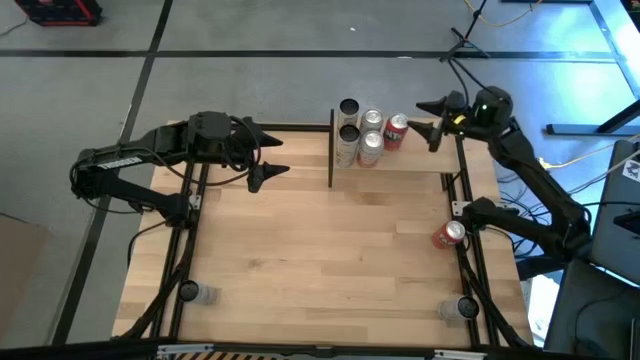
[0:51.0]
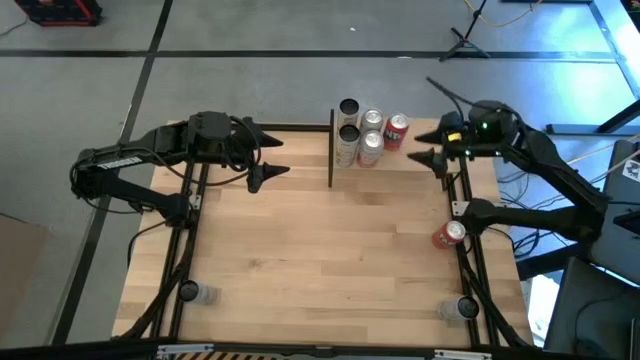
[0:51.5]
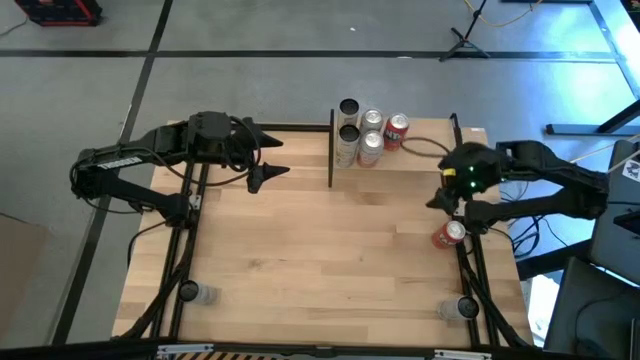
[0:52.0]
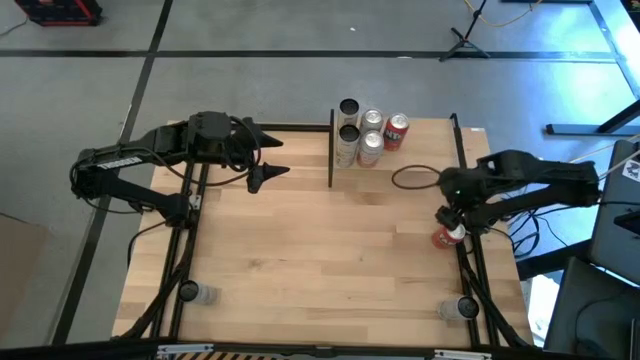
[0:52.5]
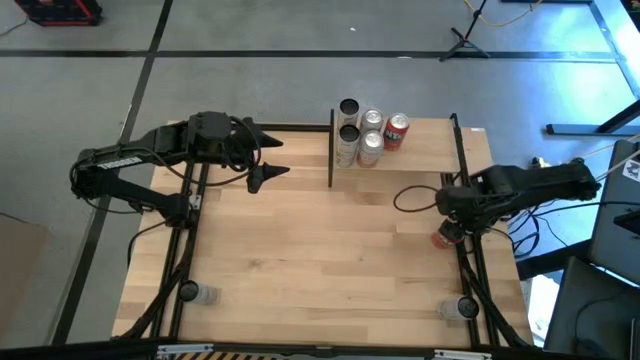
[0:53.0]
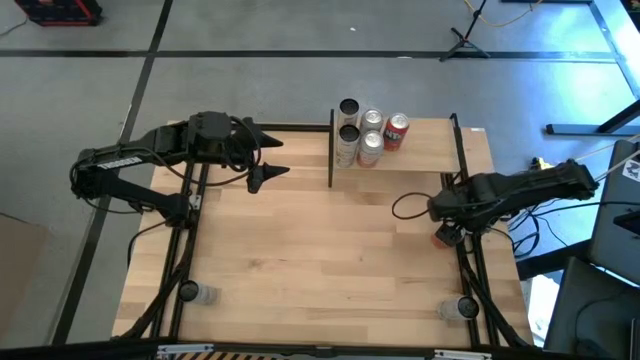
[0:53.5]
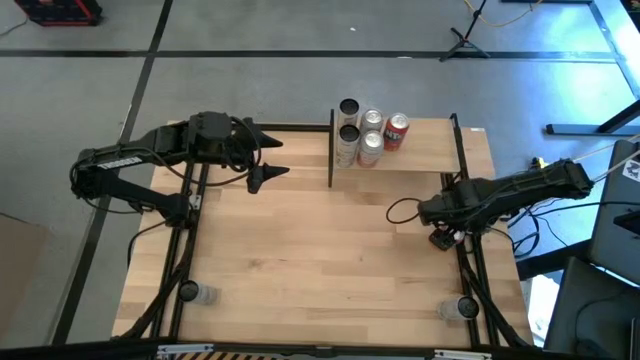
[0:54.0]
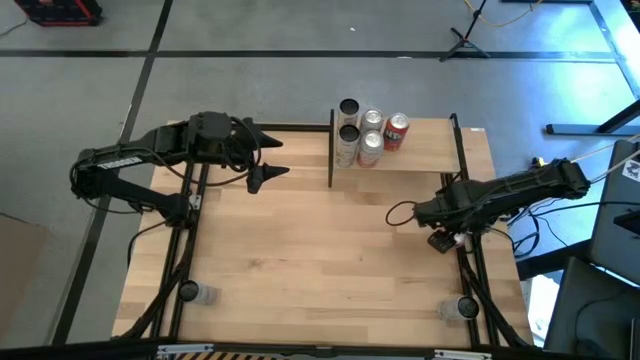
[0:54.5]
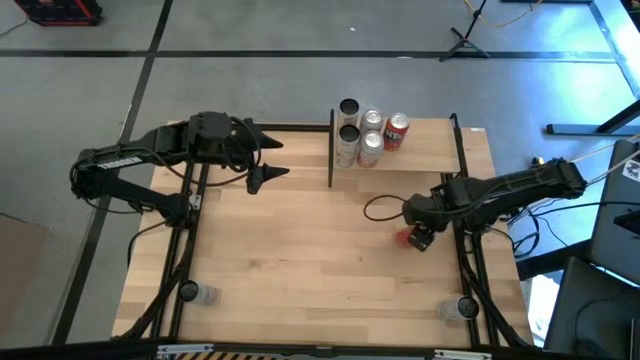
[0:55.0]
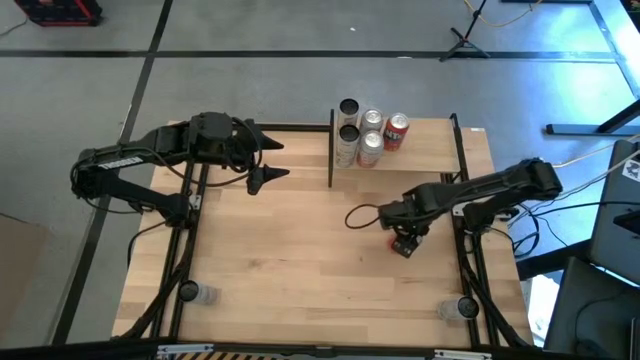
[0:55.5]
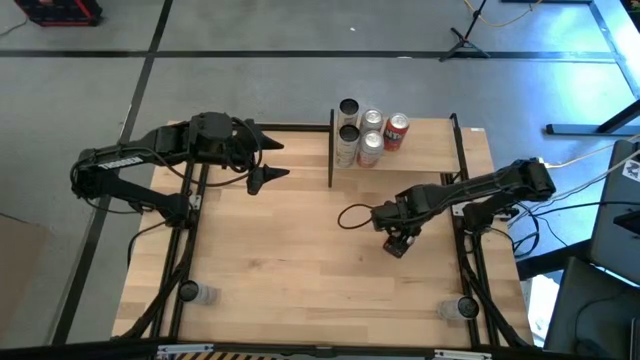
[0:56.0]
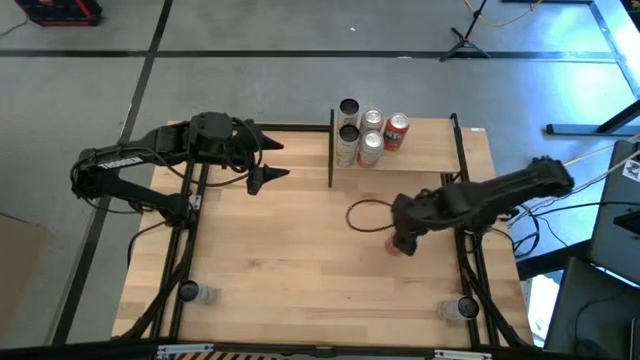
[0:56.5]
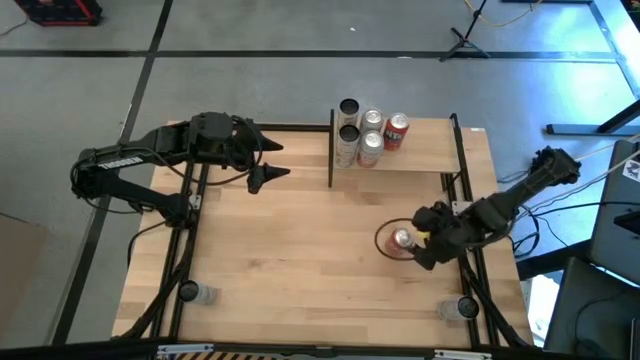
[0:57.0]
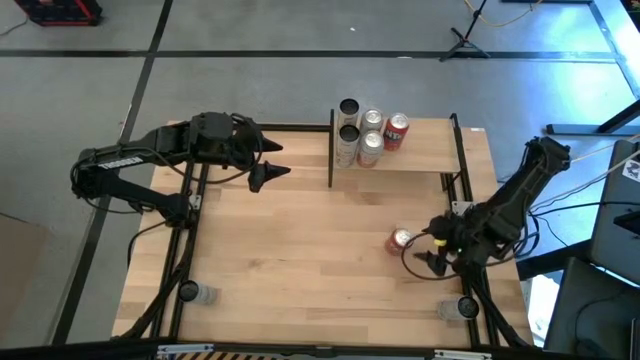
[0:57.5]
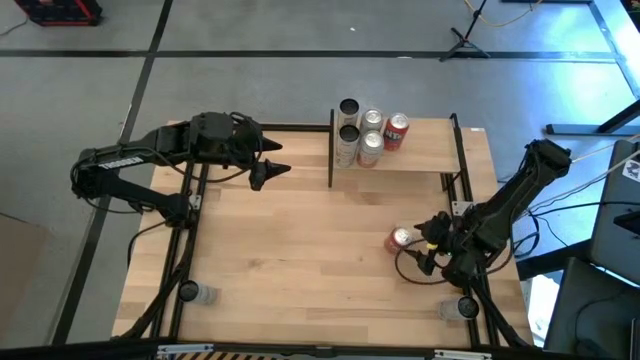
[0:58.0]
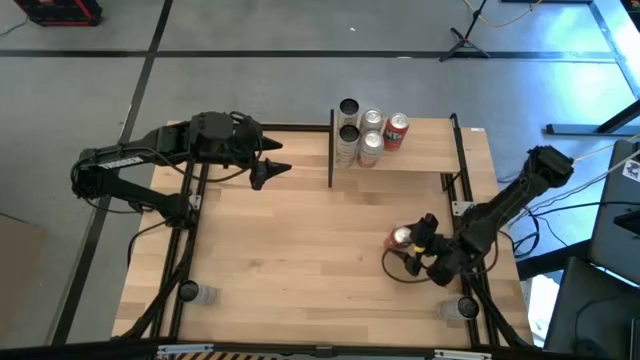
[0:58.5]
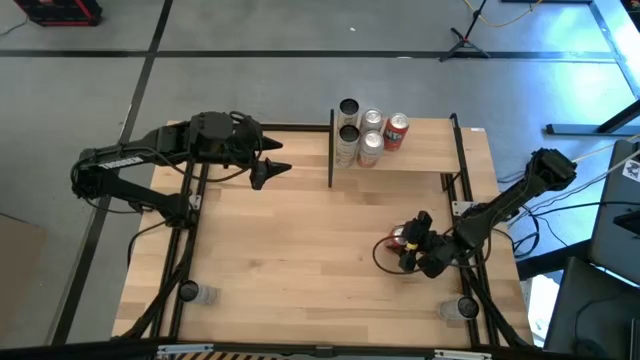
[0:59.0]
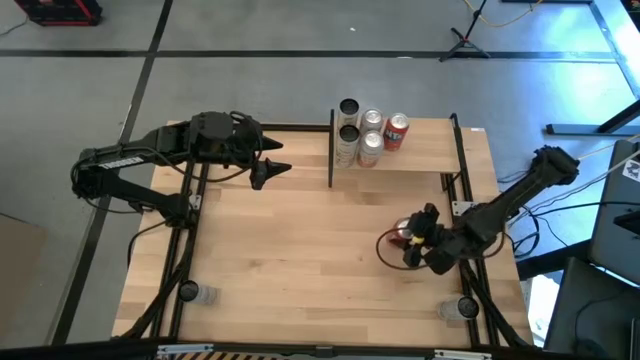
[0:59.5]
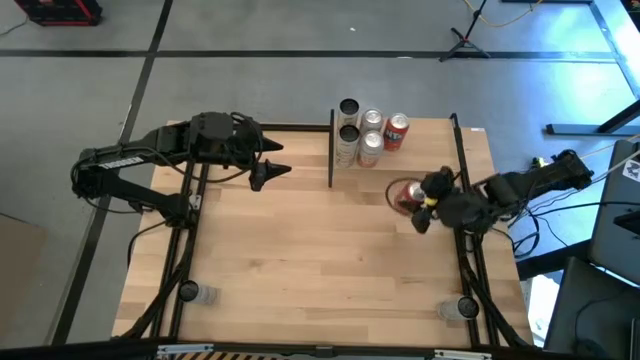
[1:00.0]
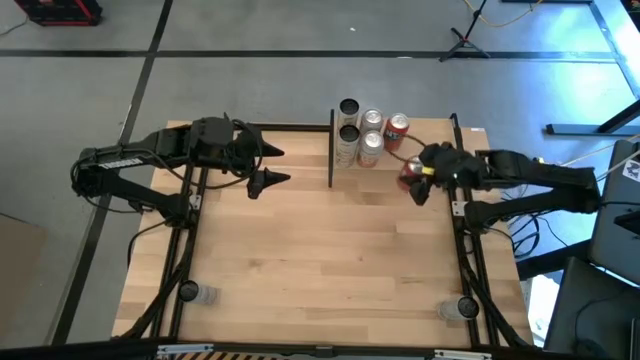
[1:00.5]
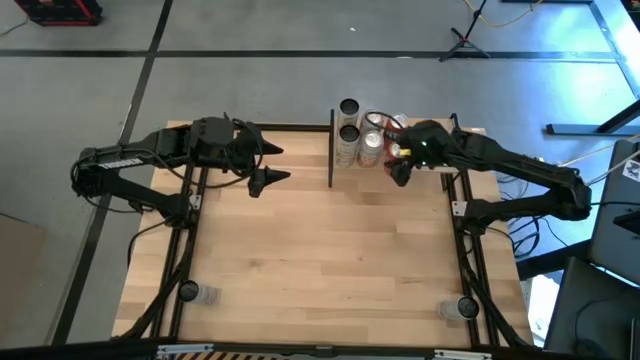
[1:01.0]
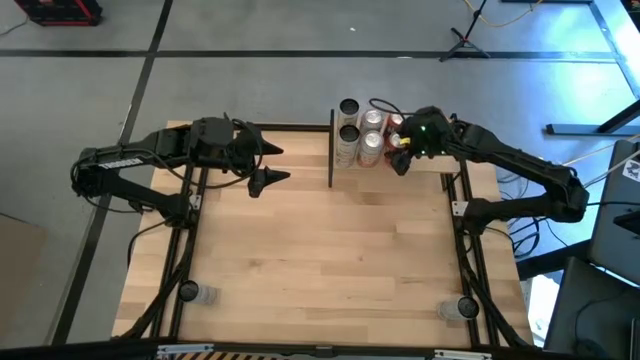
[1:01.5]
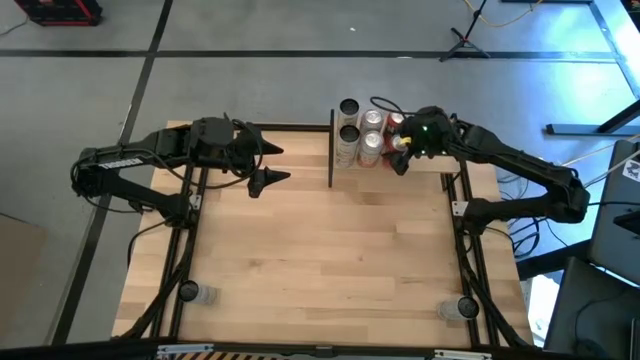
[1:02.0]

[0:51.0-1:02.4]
Task: Place canned beverage on shelf
Put the orange soda can onto the shelf

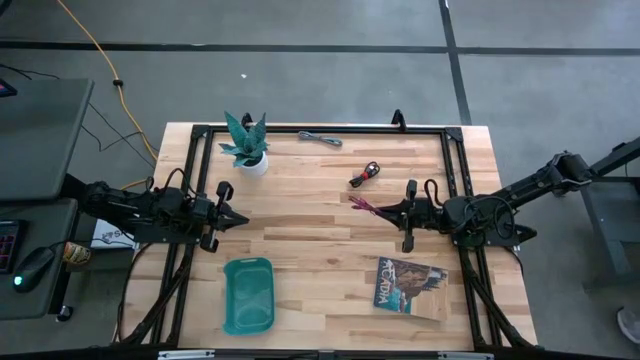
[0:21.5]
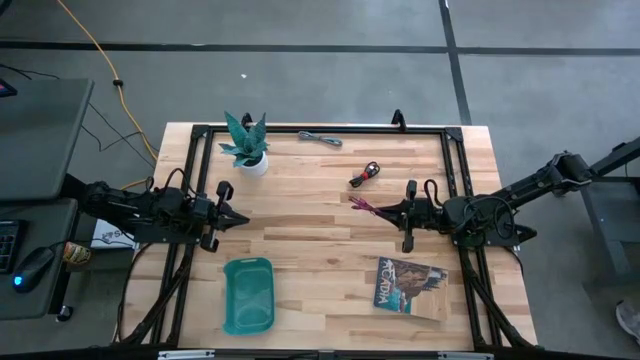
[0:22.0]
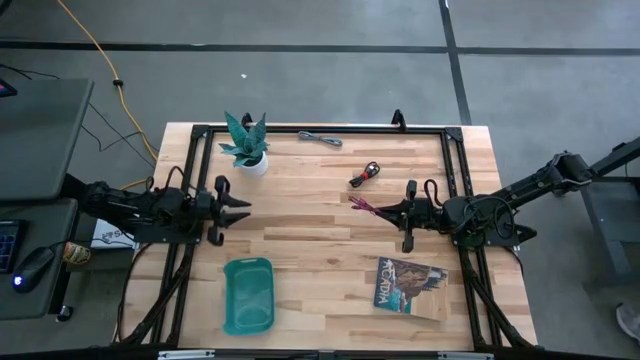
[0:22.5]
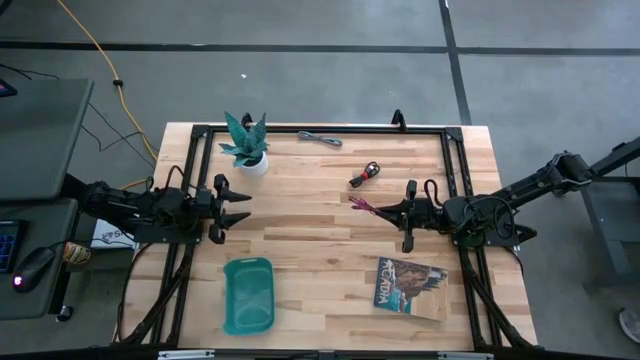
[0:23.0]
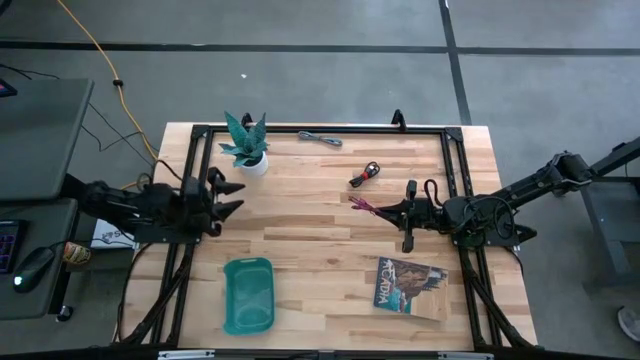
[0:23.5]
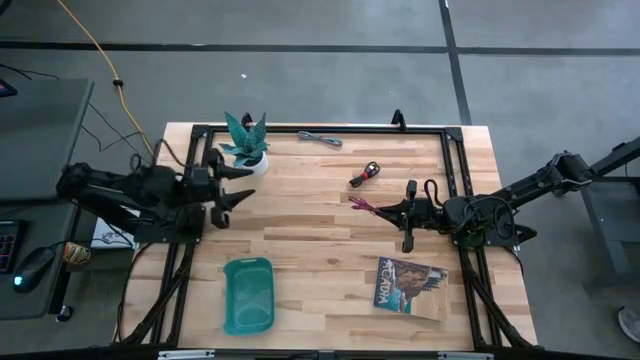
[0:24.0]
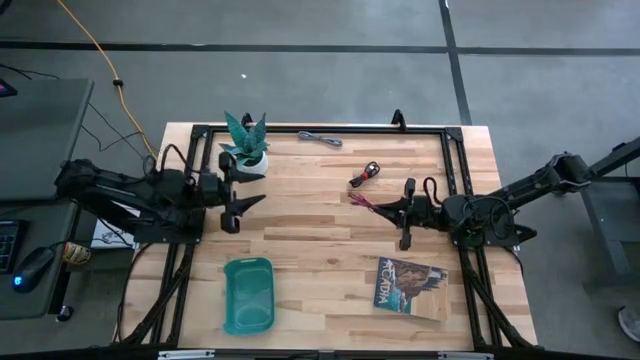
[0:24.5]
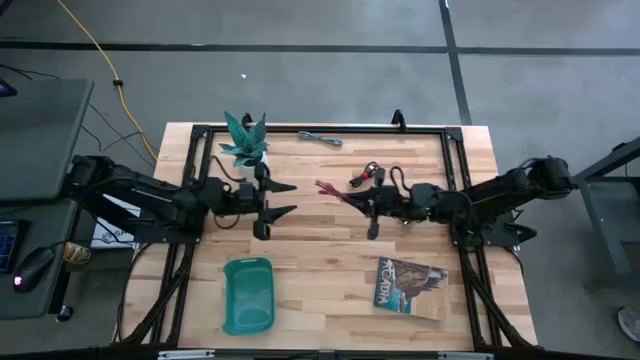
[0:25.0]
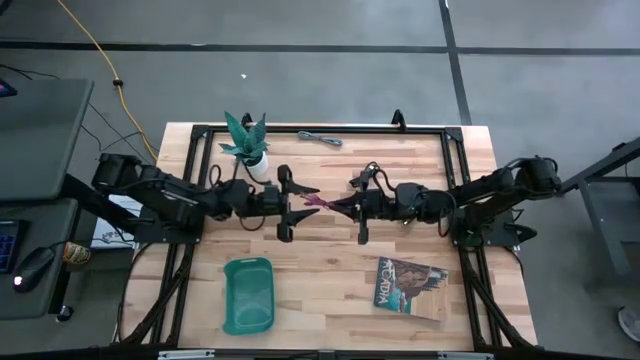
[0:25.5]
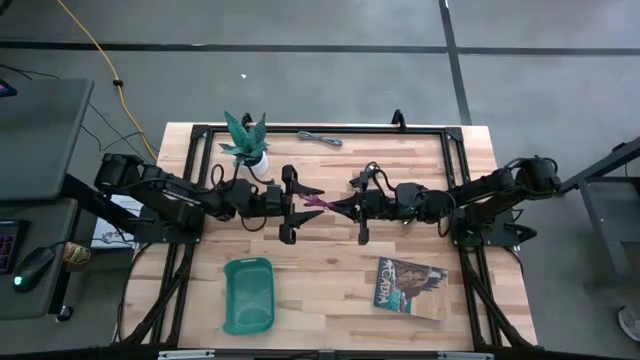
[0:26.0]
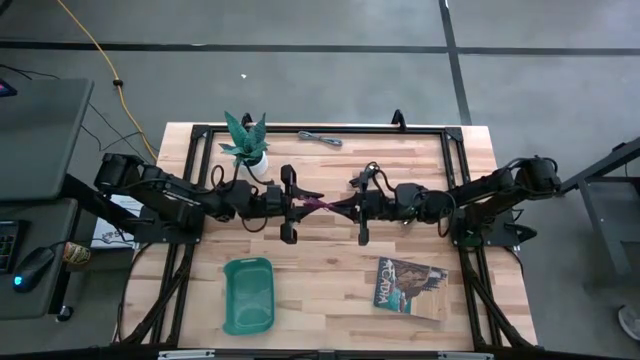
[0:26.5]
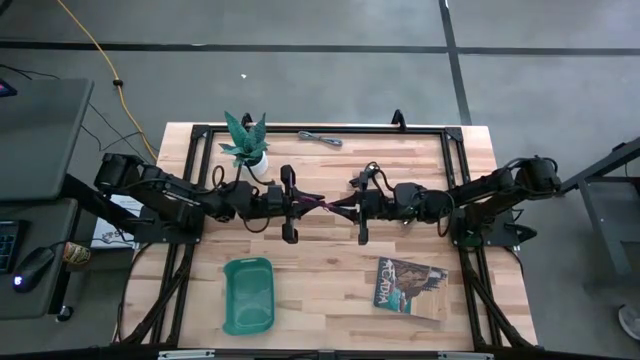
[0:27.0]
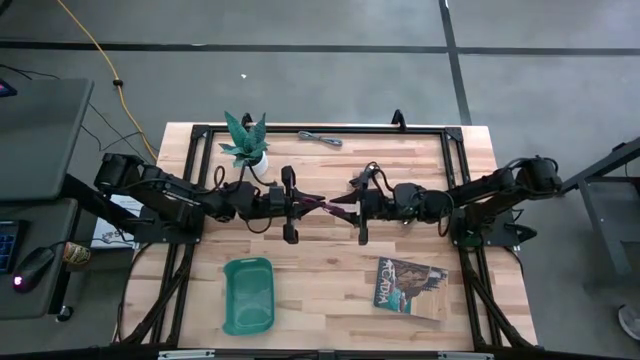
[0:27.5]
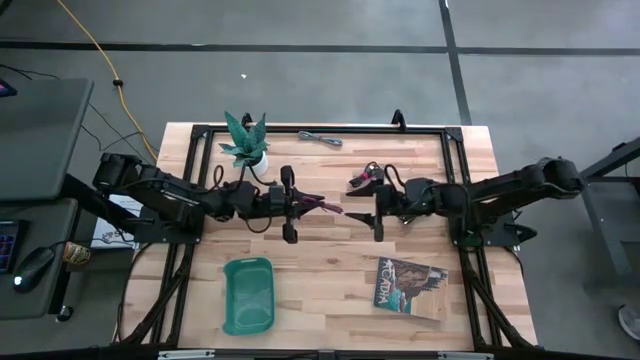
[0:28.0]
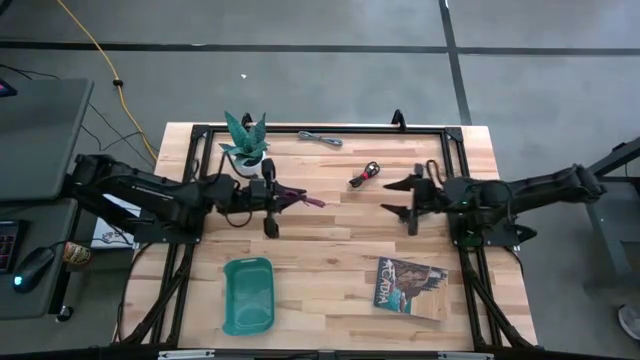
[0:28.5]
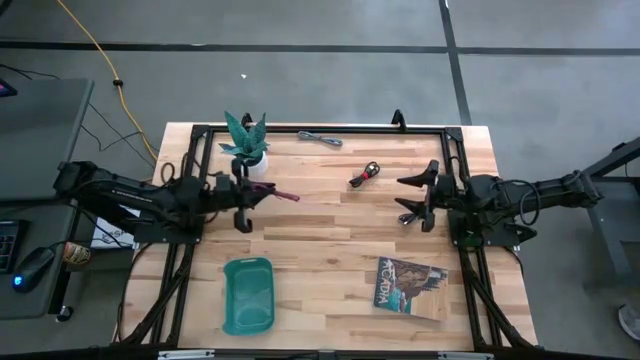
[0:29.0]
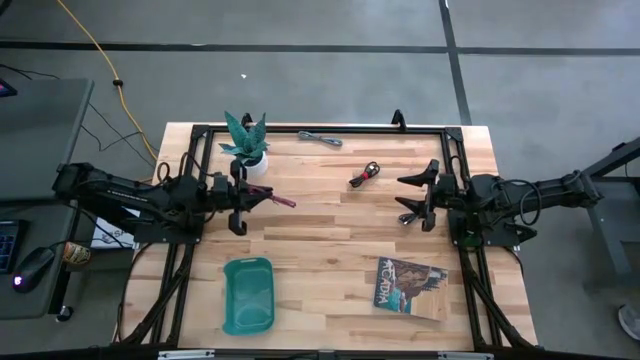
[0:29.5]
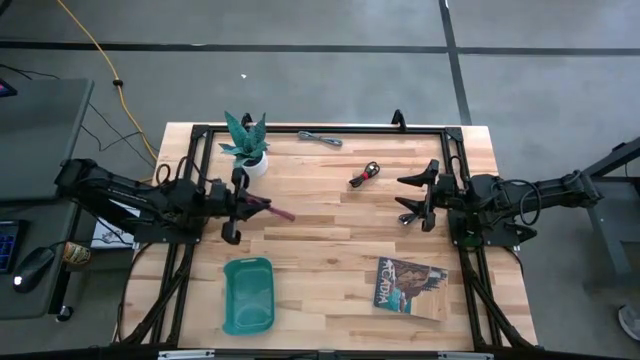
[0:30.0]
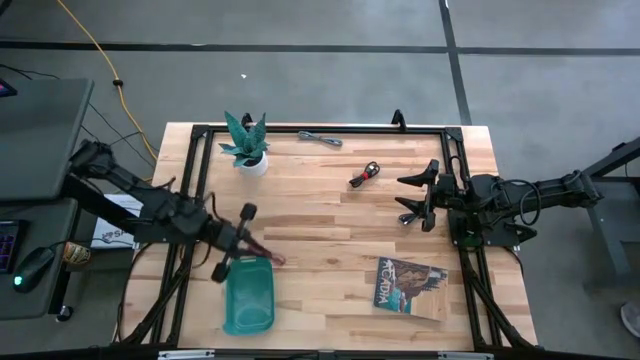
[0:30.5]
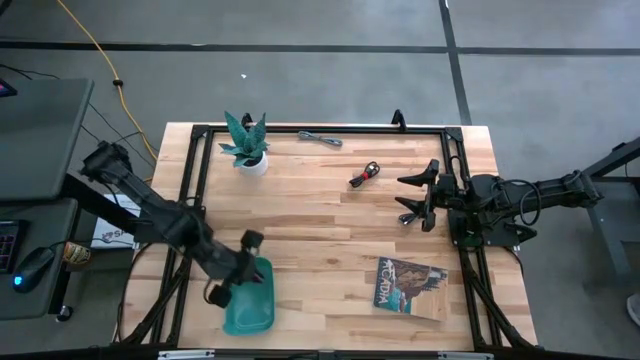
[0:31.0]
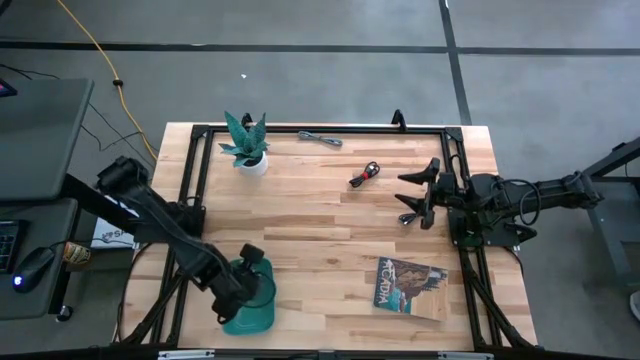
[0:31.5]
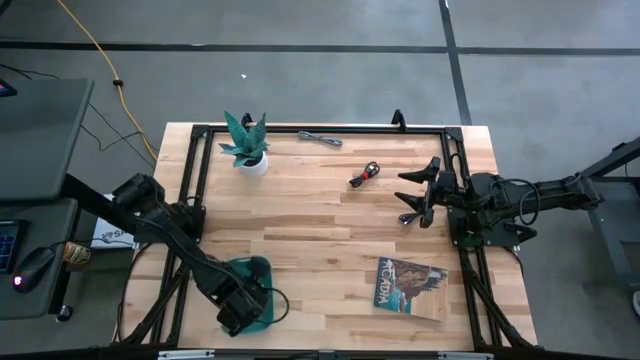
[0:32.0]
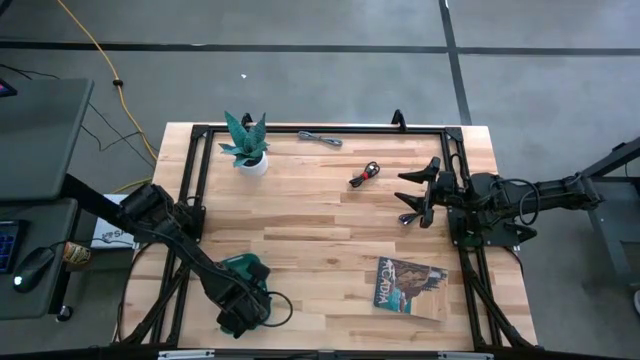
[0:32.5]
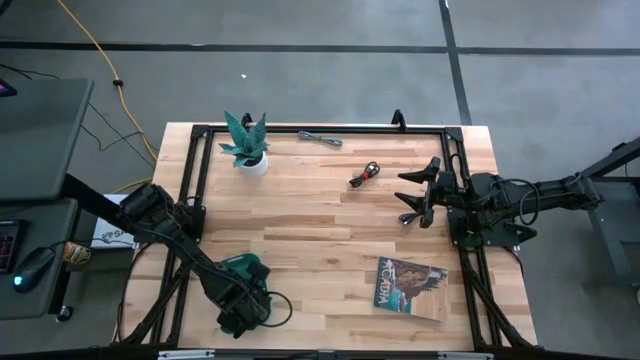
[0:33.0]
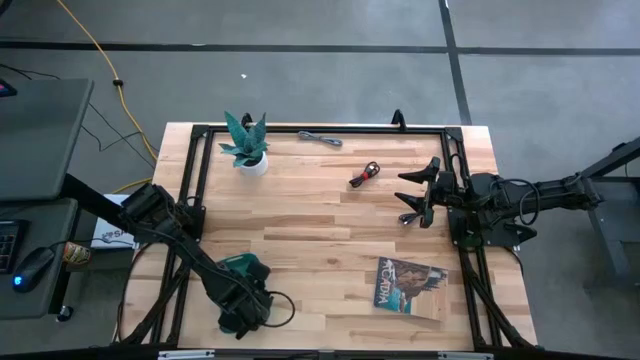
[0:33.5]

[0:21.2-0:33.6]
Task: Pick and place USB-C Cables
Put the pink USB cable into the green bin
